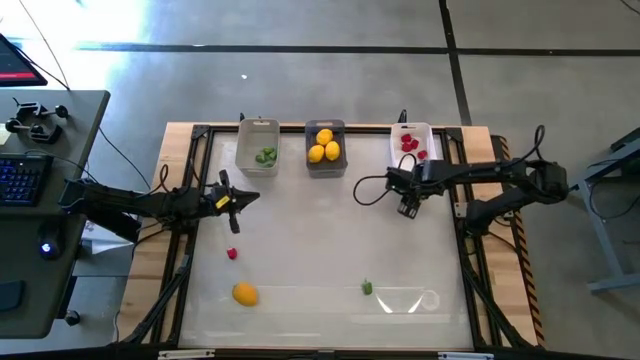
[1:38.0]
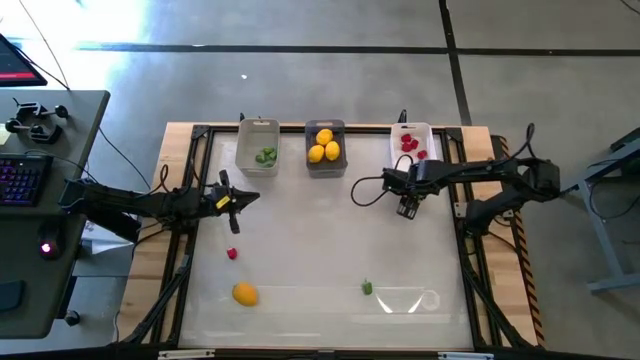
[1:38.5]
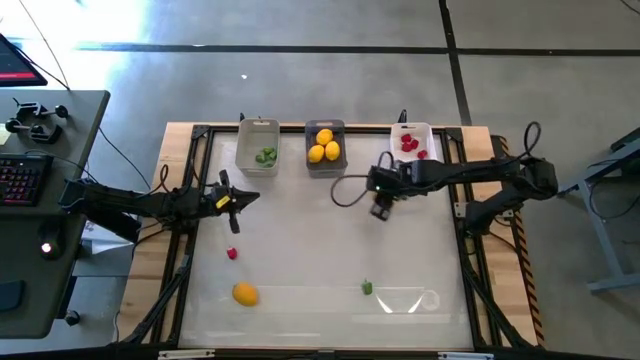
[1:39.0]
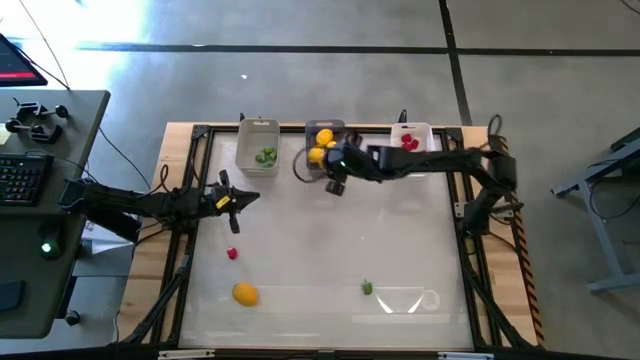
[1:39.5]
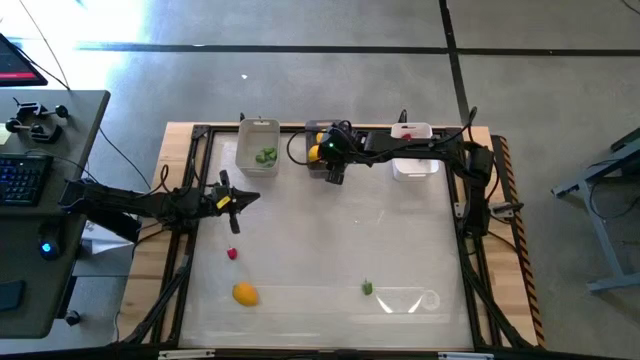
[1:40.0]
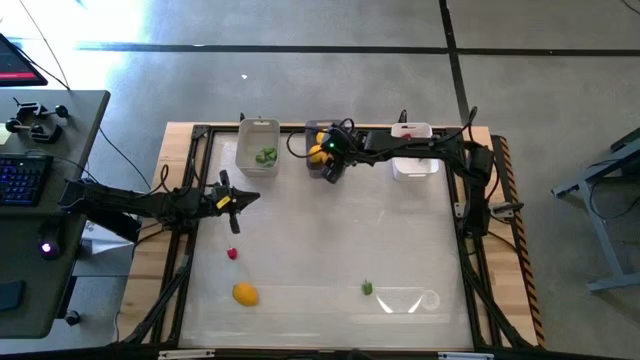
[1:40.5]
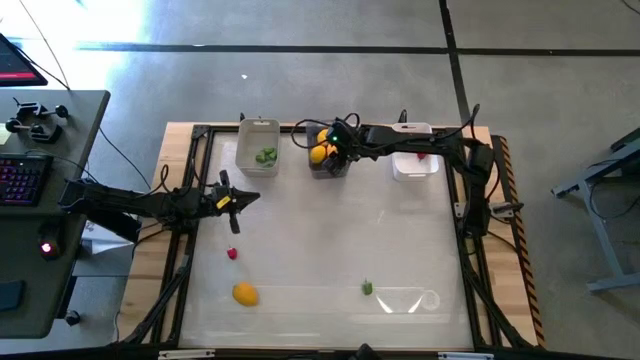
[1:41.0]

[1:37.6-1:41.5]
Task: Sort produce into baskets
Put the lemon into the black bin

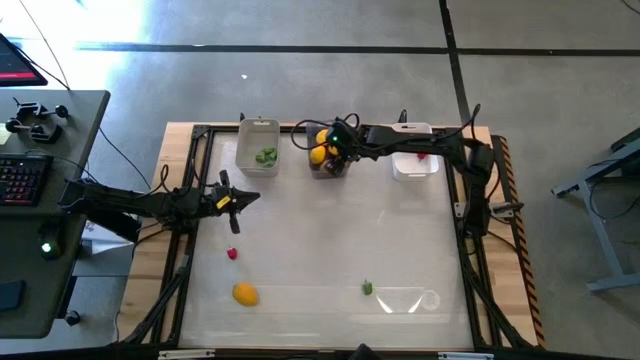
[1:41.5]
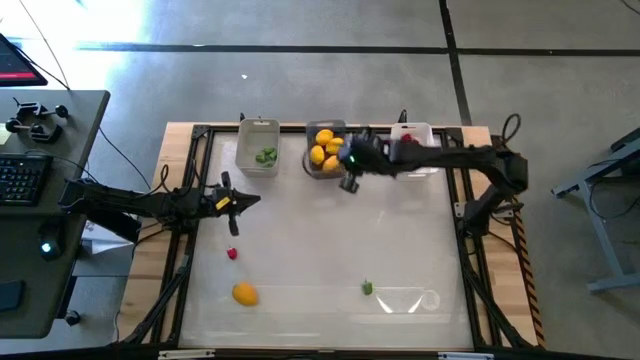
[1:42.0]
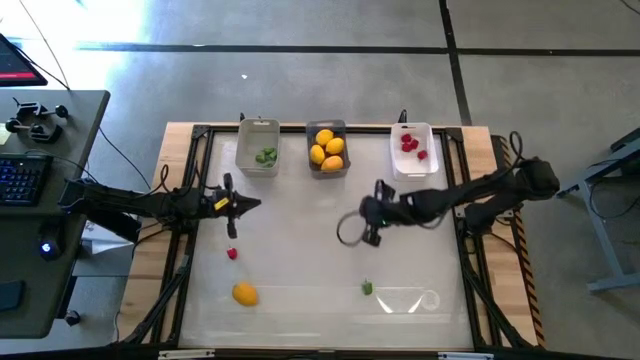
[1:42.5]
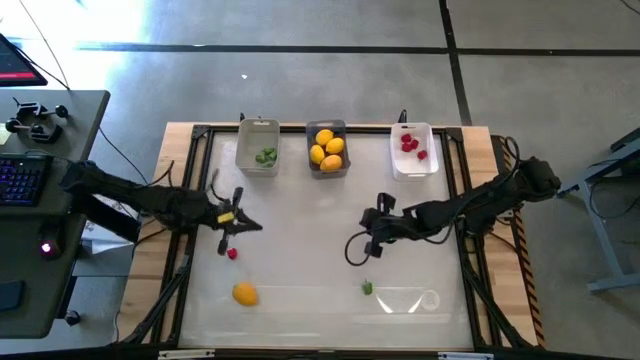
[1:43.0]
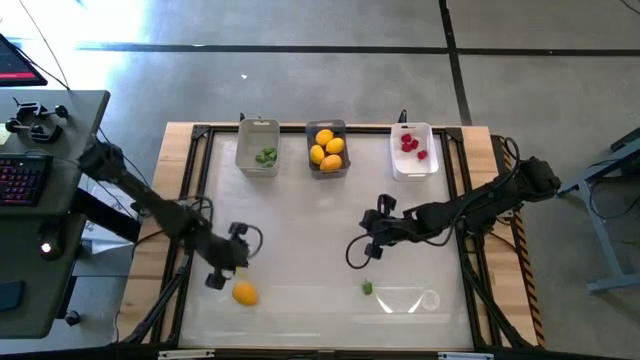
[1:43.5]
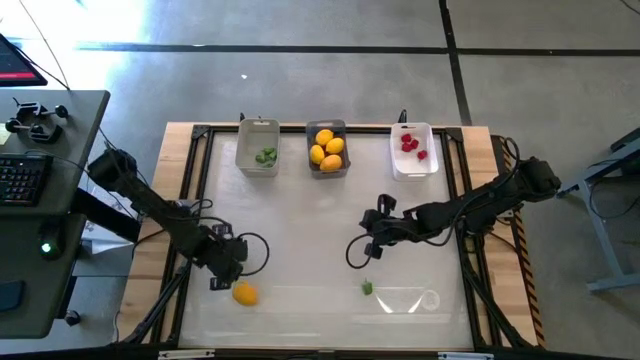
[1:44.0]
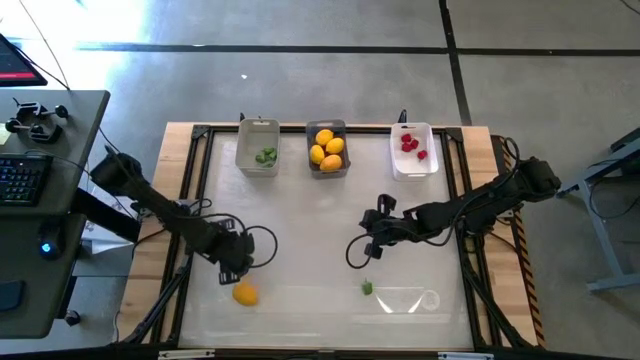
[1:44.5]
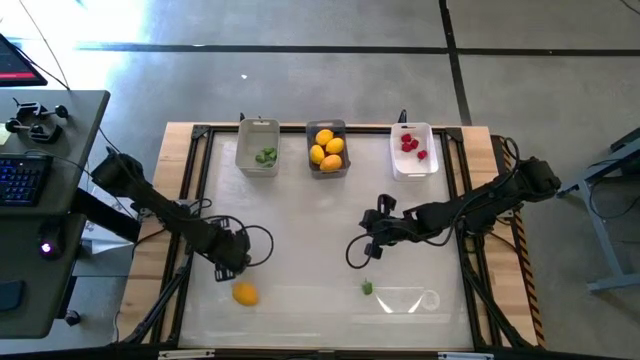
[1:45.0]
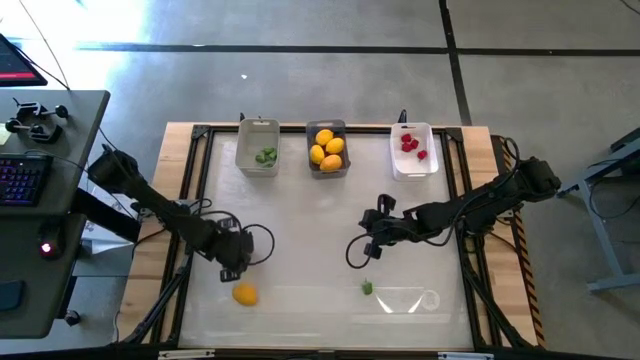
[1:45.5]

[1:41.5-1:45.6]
Put the red bell pepper into the white bin

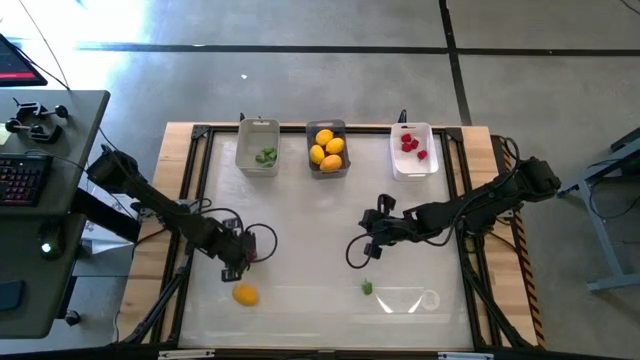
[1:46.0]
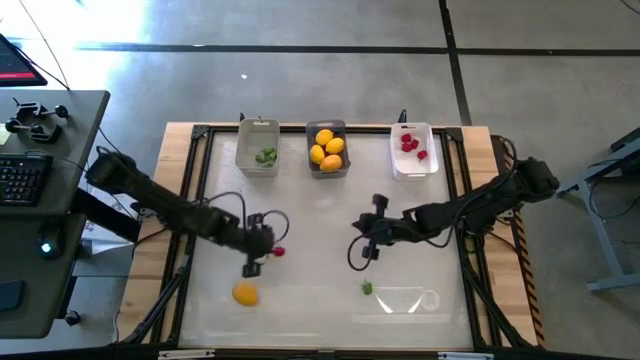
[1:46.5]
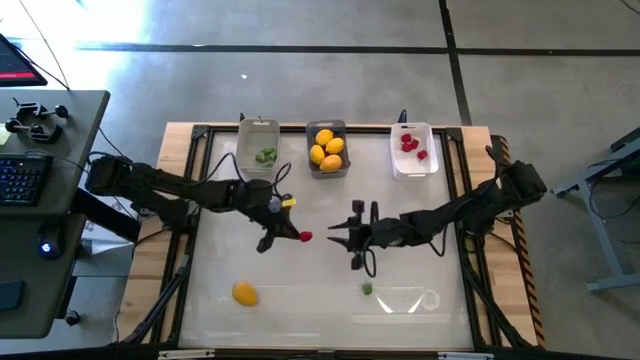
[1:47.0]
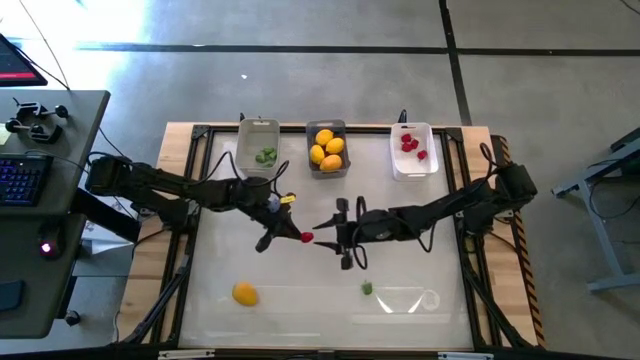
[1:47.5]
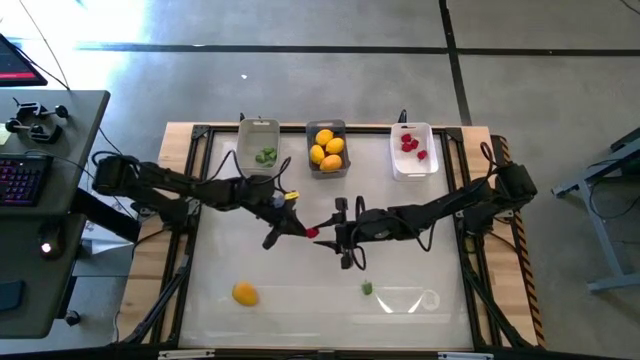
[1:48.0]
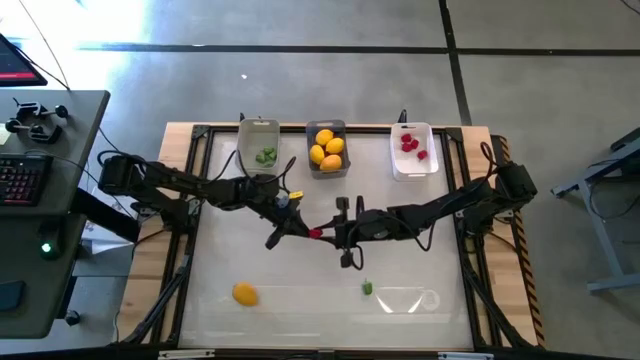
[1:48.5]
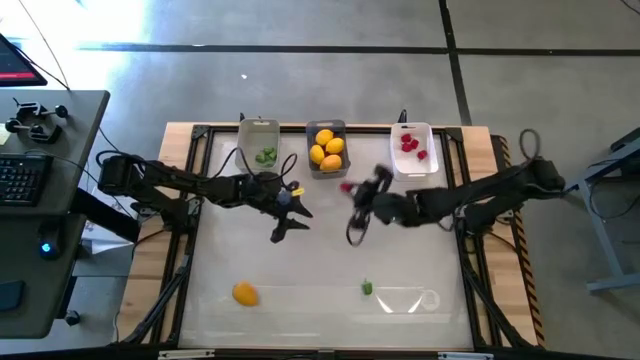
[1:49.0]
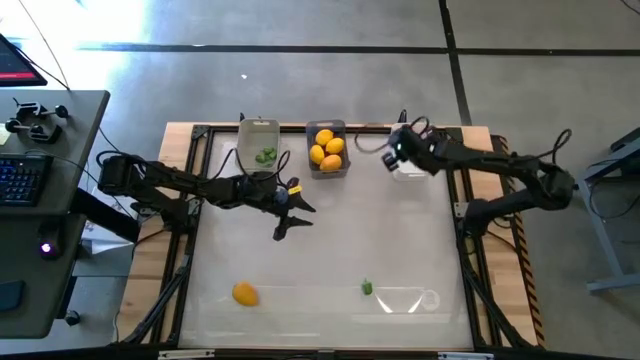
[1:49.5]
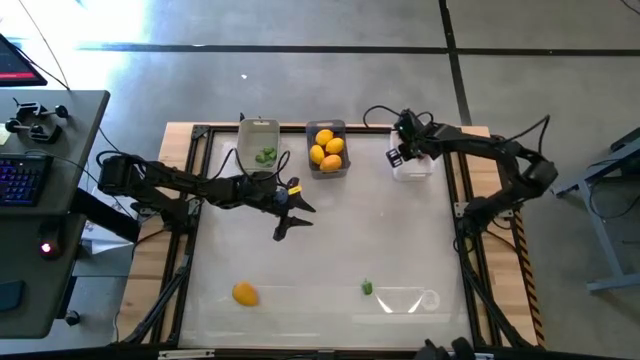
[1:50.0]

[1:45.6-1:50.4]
Put the red bell pepper into the white bin

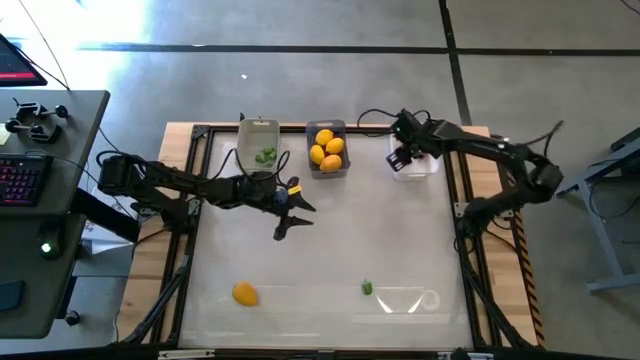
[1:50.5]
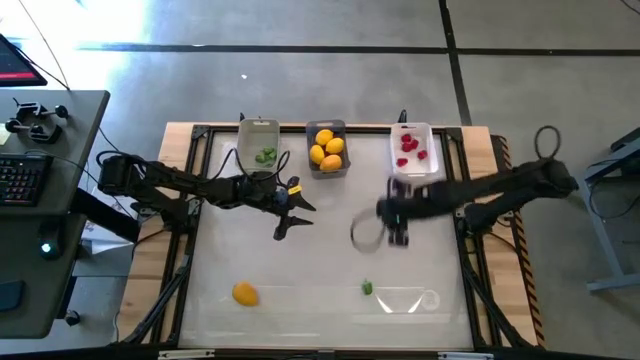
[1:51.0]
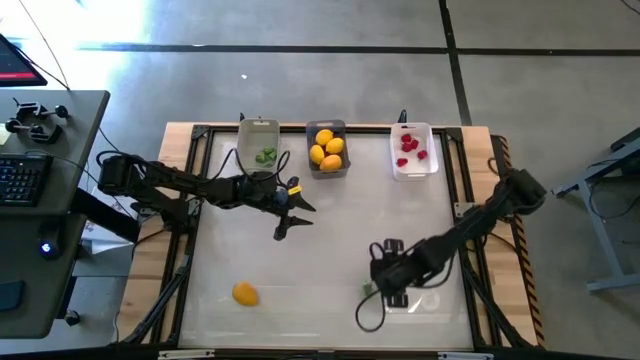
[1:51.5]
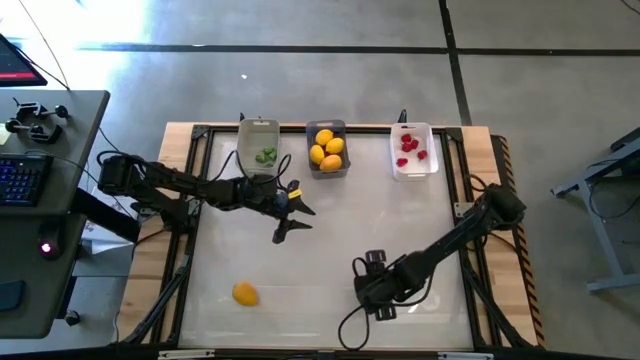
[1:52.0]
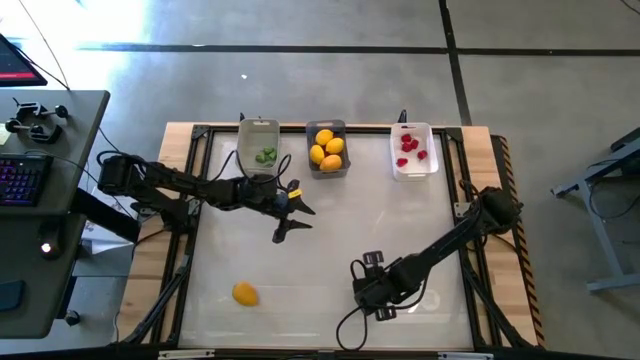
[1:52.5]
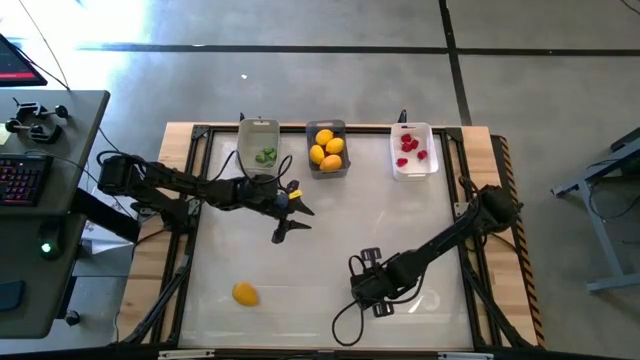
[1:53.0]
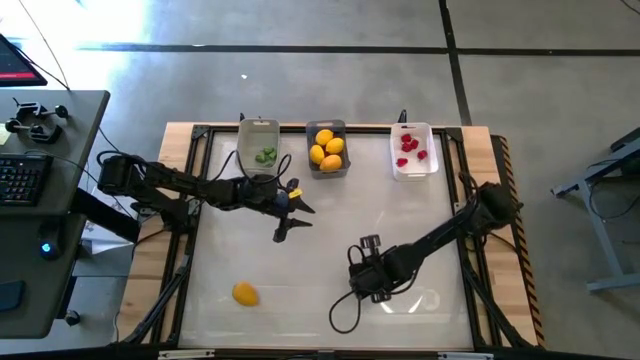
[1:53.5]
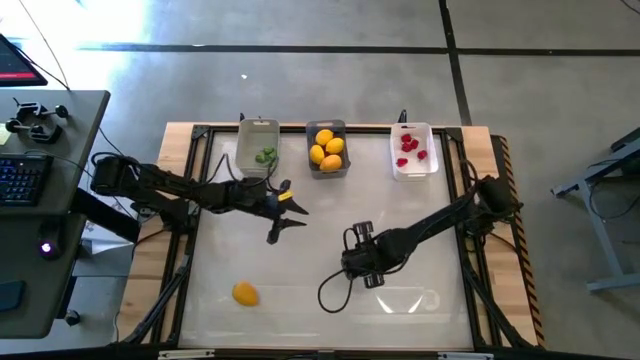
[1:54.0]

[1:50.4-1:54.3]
Put the green bell pepper into the gray bin

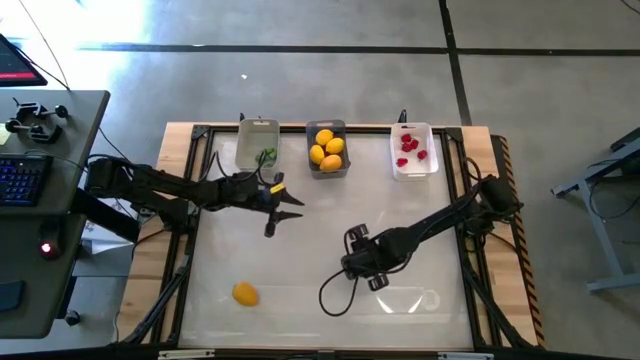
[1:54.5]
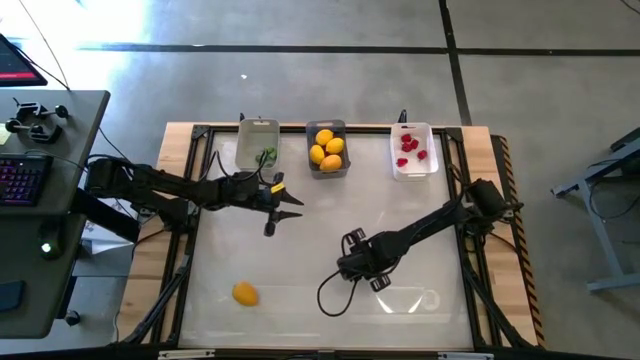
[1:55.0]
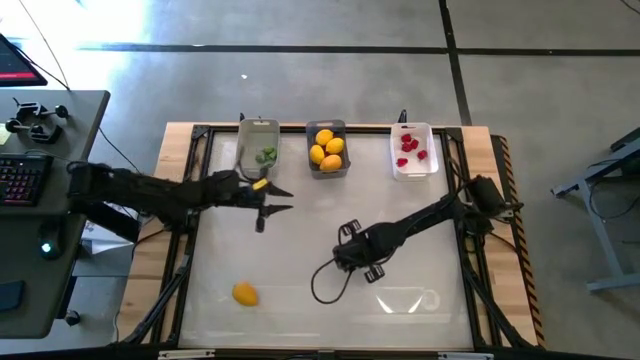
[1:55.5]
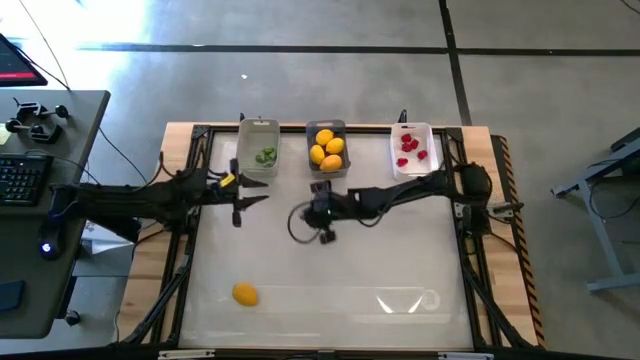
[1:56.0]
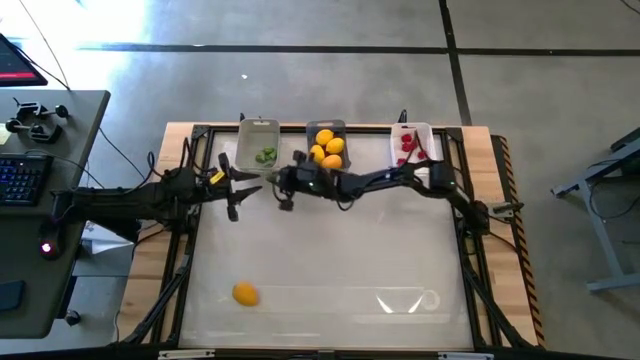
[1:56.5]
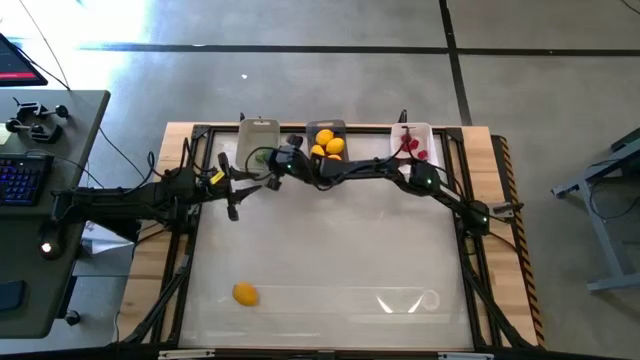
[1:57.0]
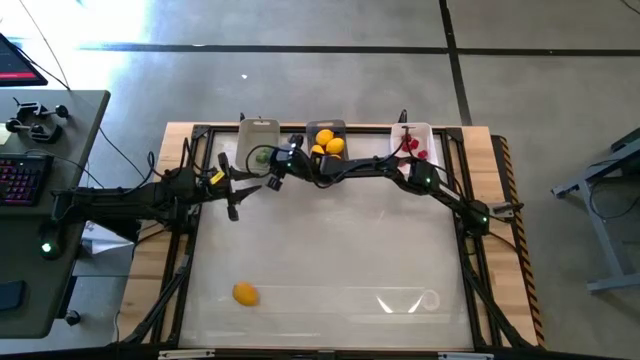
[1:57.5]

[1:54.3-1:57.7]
Put the green bell pepper into the gray bin
